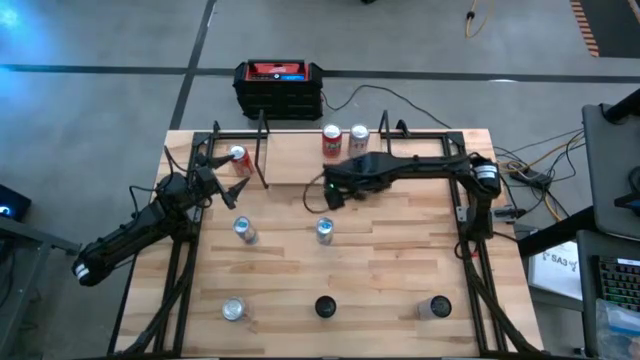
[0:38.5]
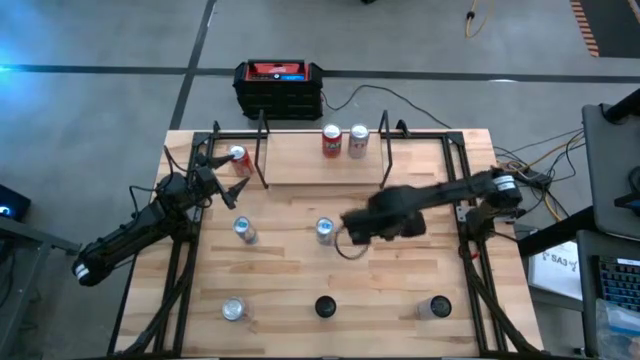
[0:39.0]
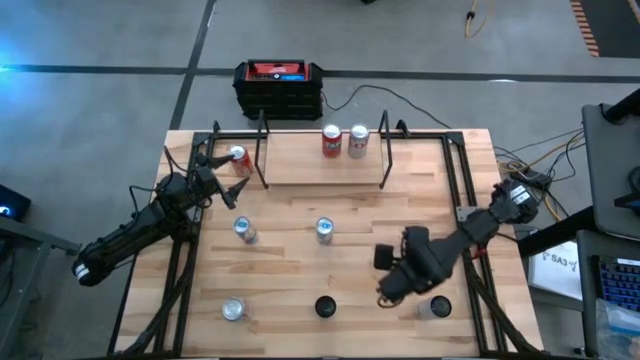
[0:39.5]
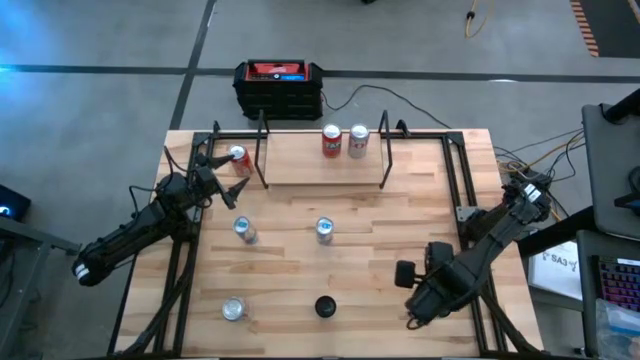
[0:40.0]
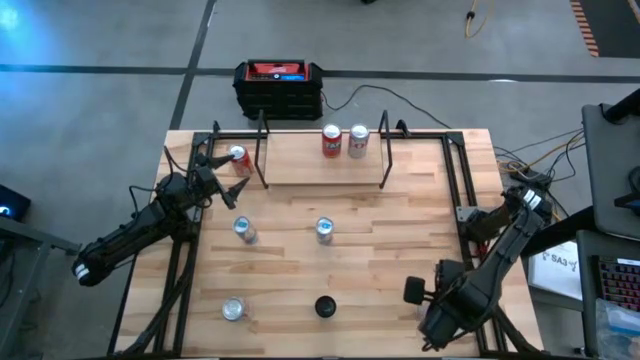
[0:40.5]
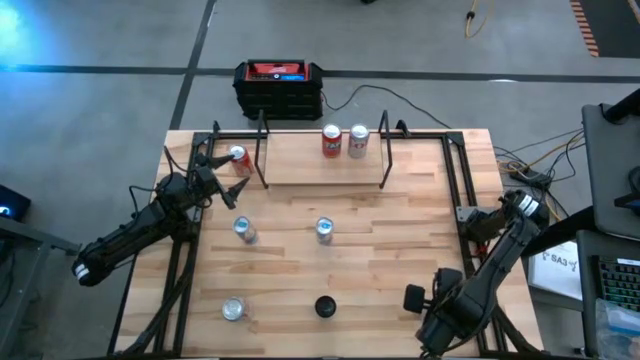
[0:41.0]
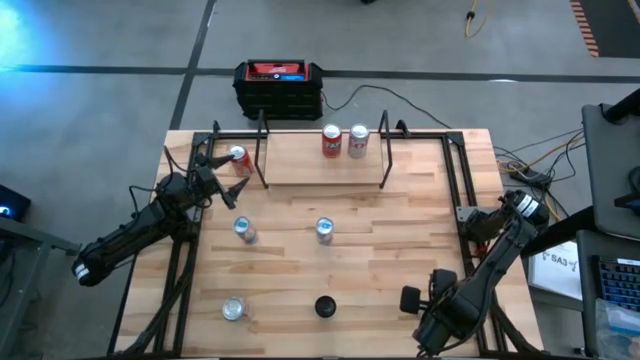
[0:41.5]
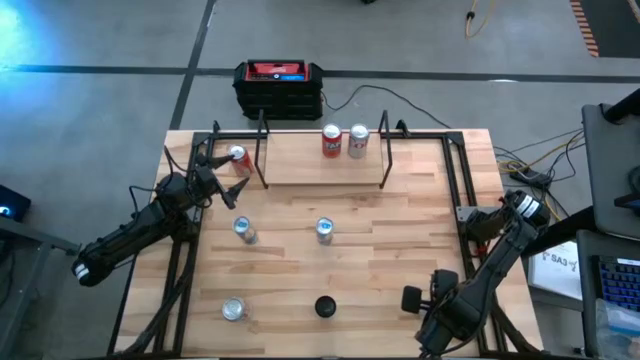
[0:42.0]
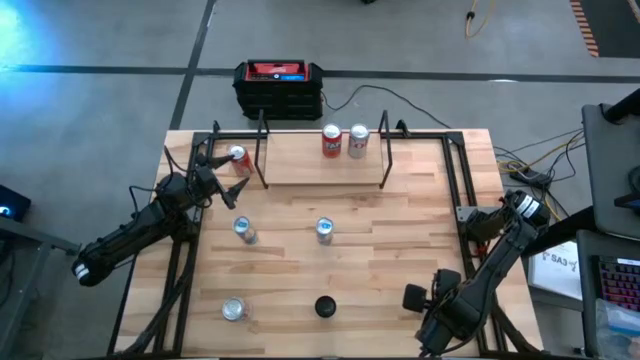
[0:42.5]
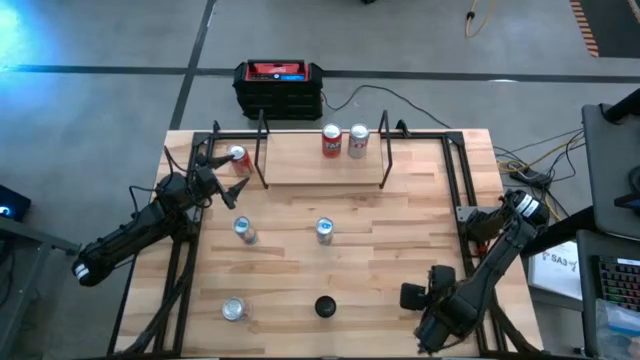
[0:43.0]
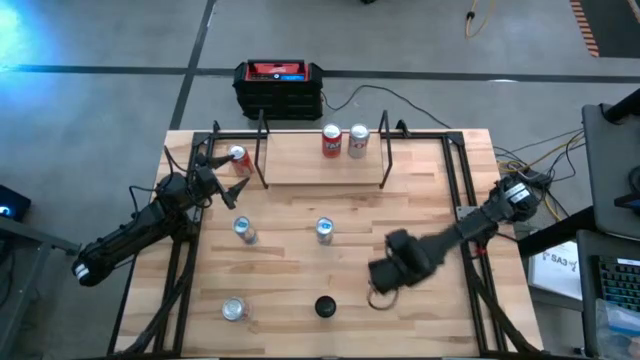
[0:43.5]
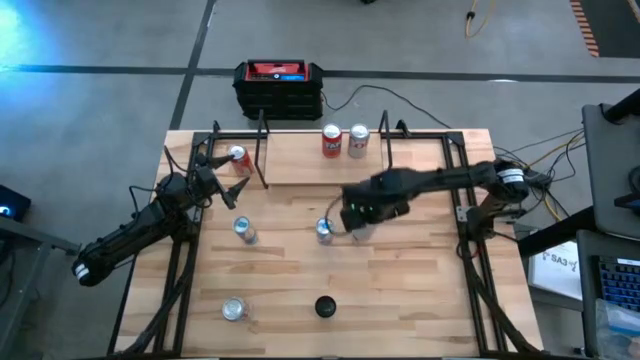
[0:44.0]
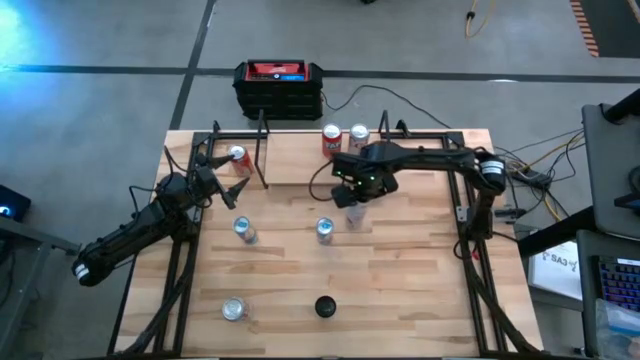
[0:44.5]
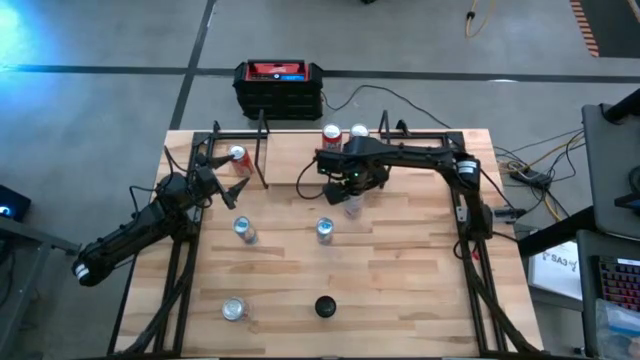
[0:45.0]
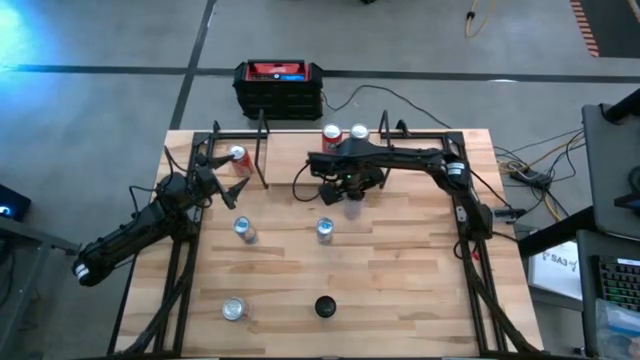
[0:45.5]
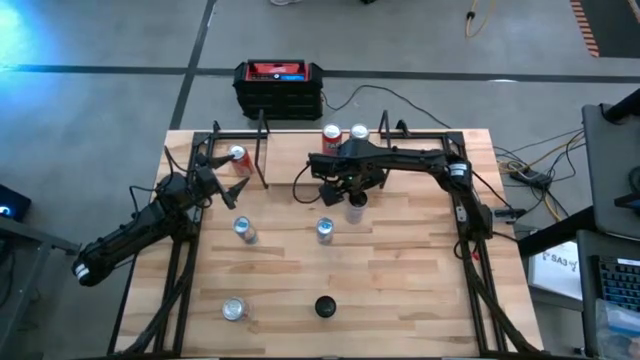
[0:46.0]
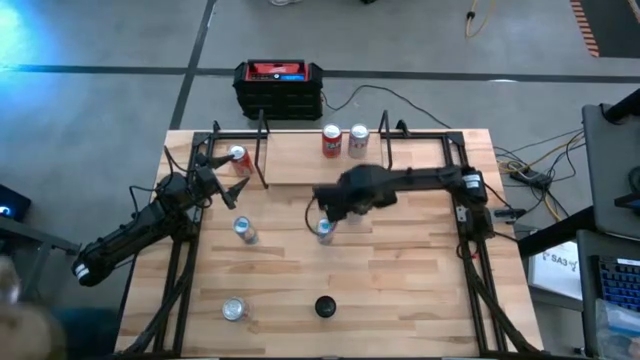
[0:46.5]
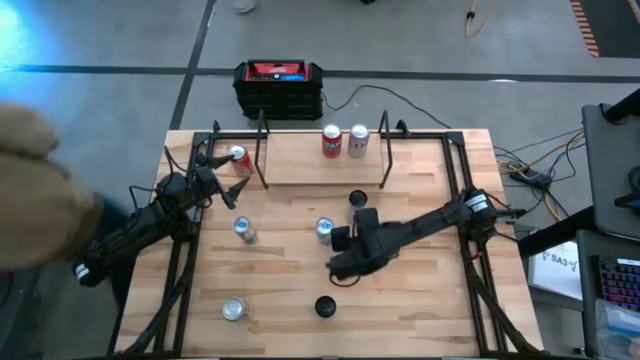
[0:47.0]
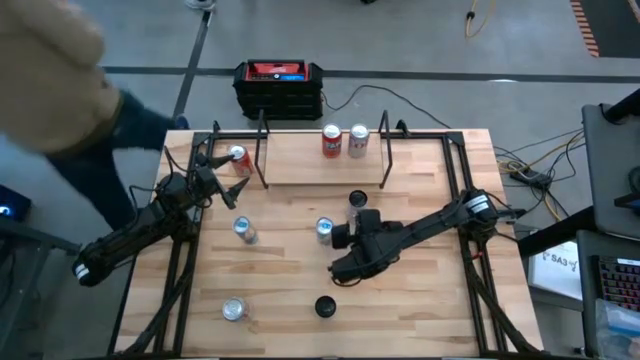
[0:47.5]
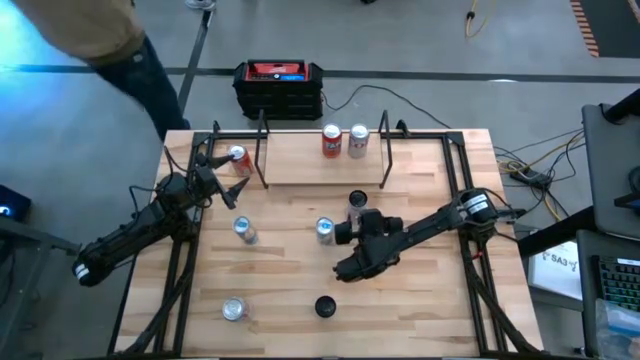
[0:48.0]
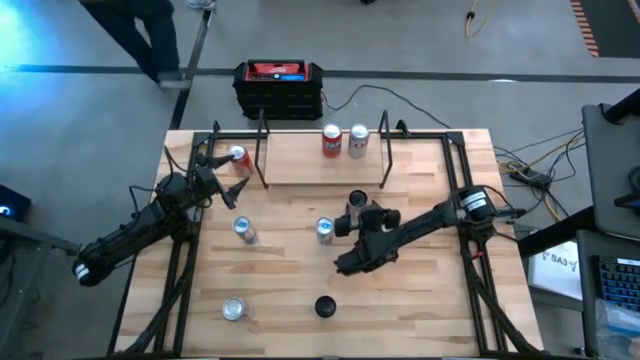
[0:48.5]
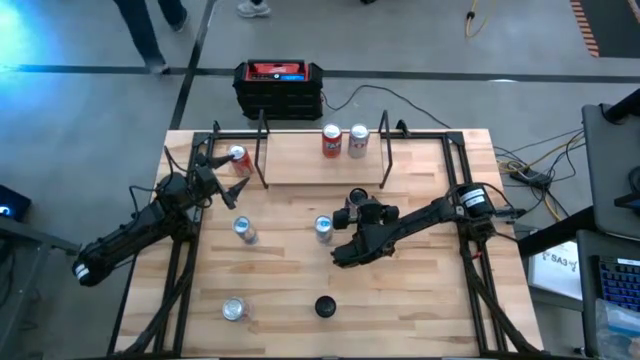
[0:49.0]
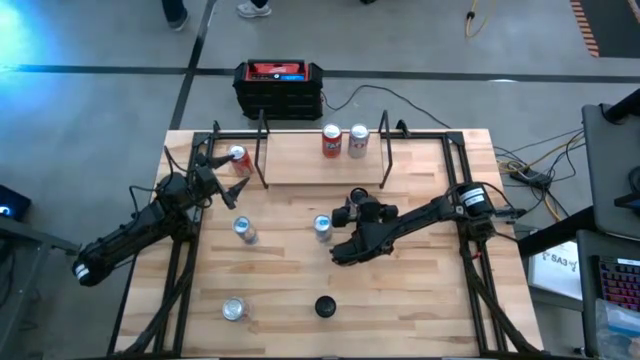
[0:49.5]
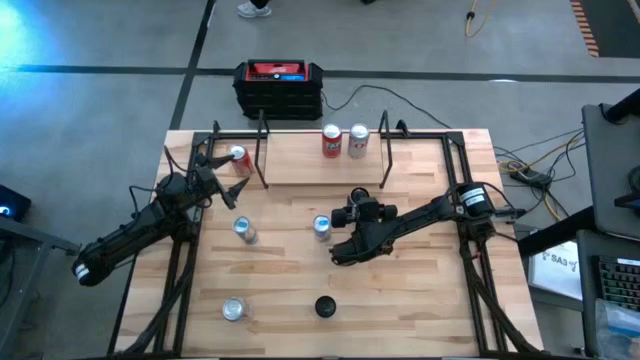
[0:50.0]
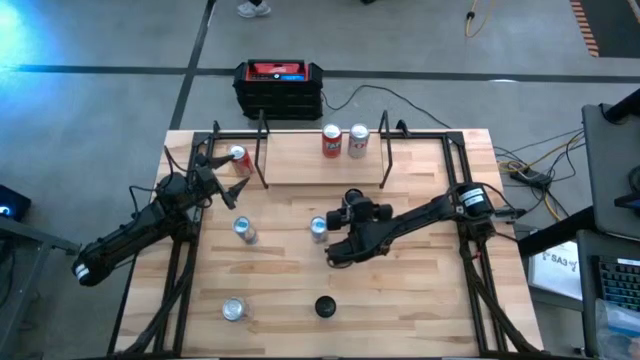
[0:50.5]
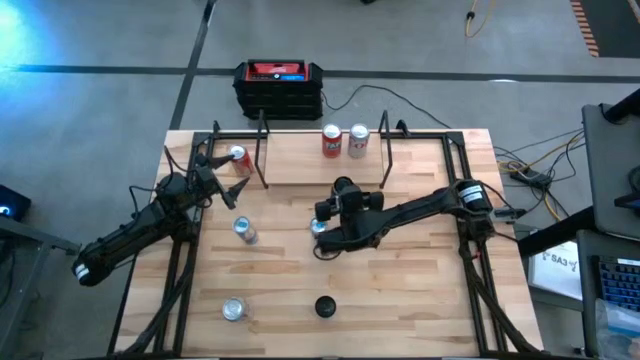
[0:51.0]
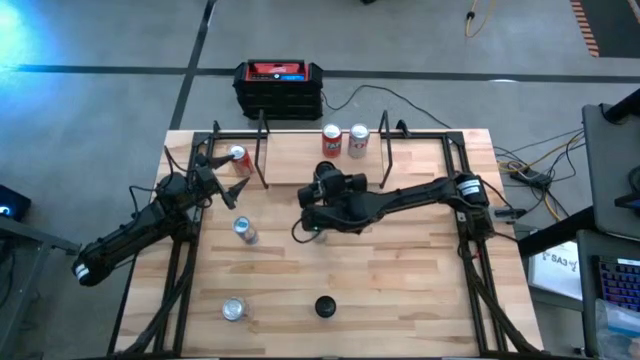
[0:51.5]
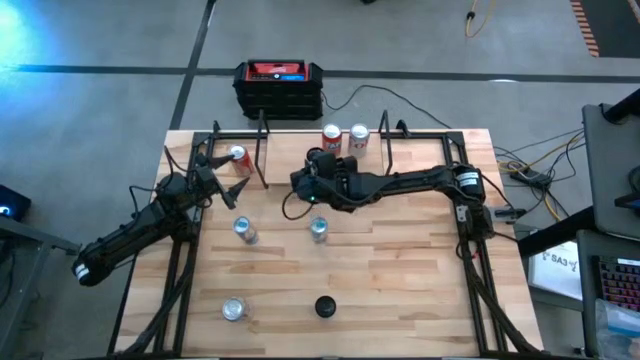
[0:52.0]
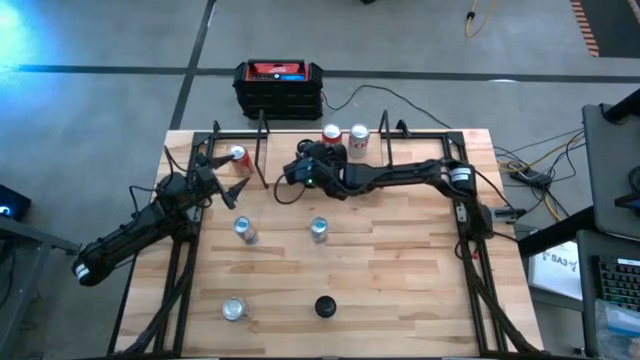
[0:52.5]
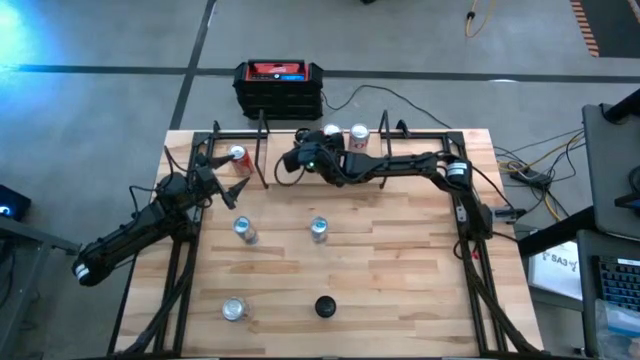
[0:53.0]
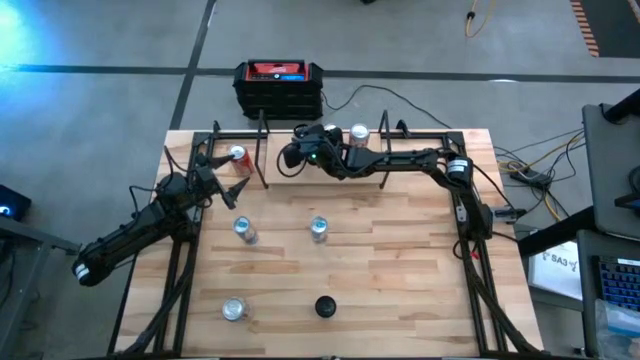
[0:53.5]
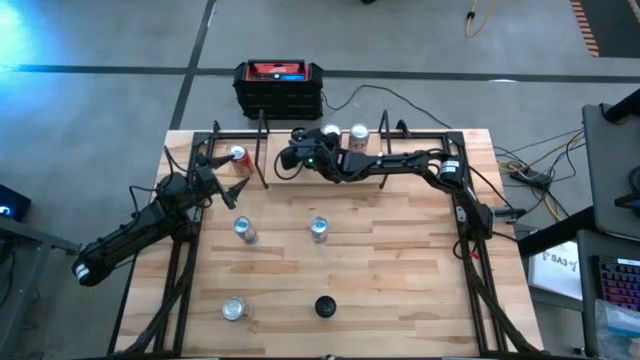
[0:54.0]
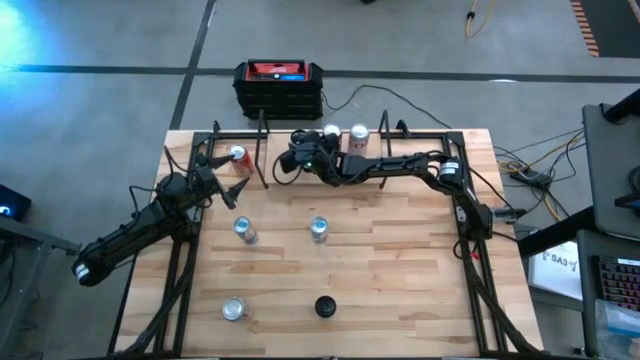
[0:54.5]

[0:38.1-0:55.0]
Task: Place canned beverage on shelf
Put the white and pink soda can on the shelf
